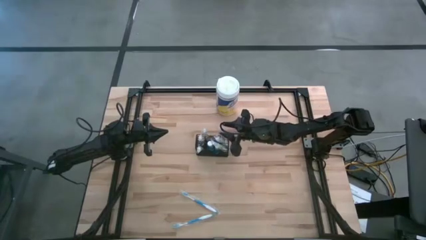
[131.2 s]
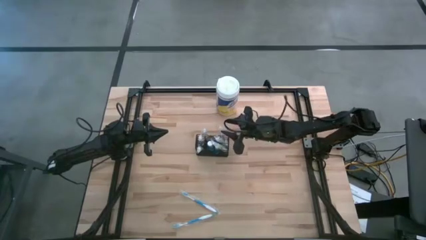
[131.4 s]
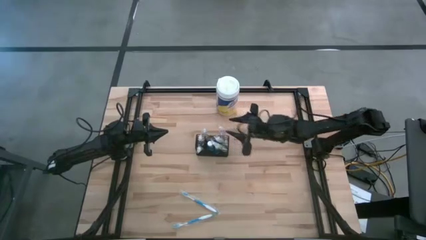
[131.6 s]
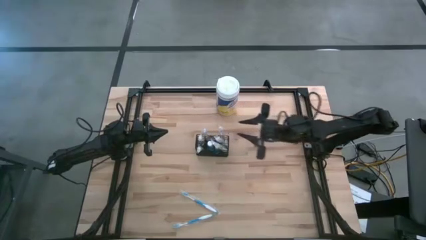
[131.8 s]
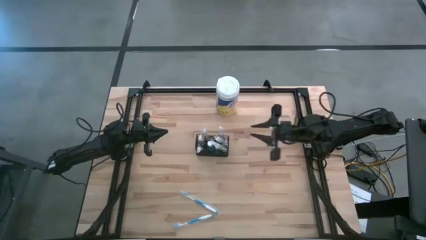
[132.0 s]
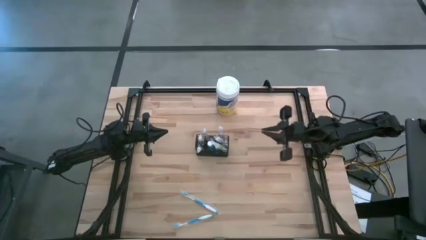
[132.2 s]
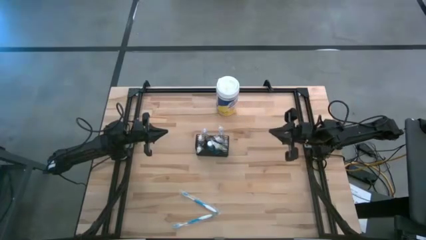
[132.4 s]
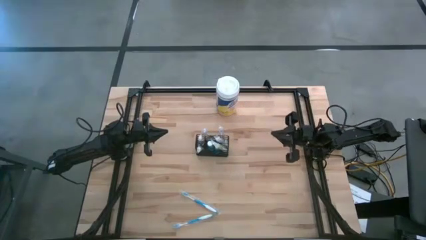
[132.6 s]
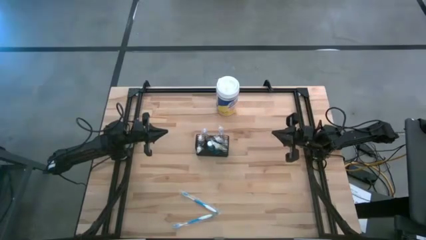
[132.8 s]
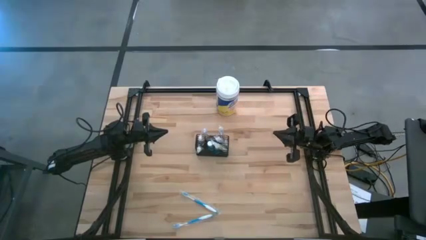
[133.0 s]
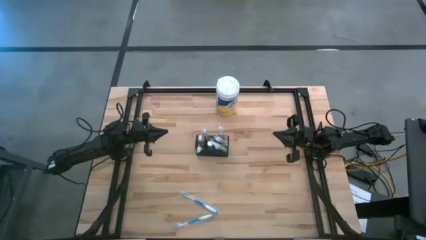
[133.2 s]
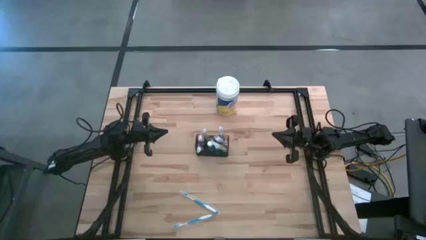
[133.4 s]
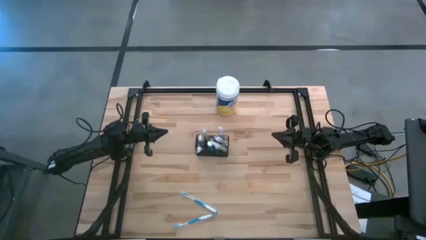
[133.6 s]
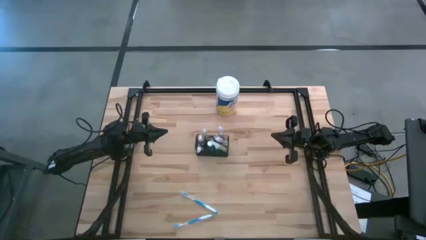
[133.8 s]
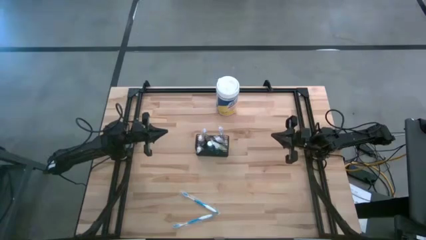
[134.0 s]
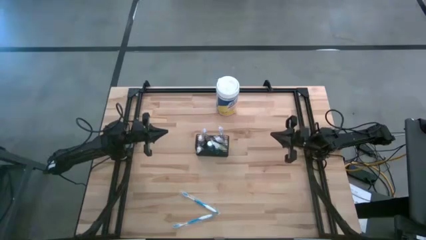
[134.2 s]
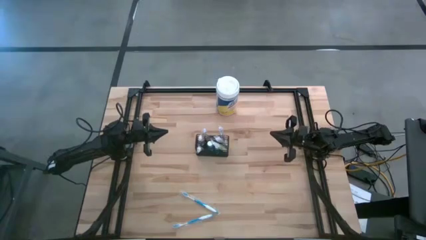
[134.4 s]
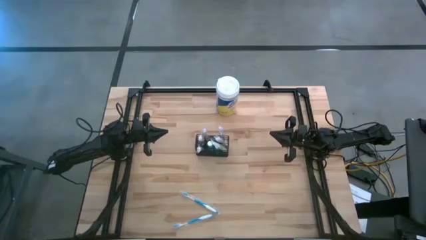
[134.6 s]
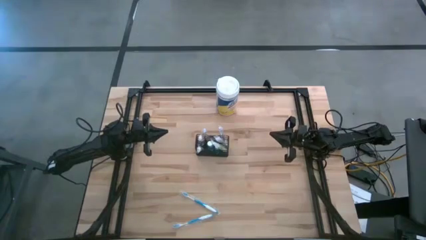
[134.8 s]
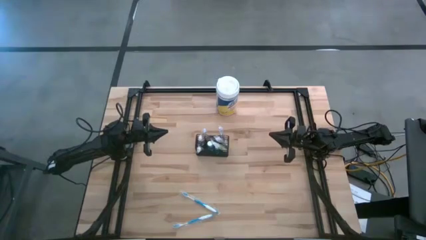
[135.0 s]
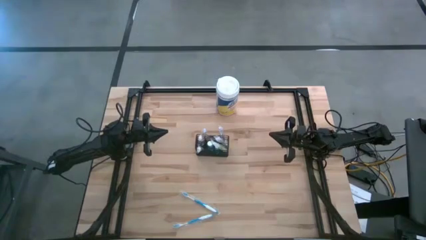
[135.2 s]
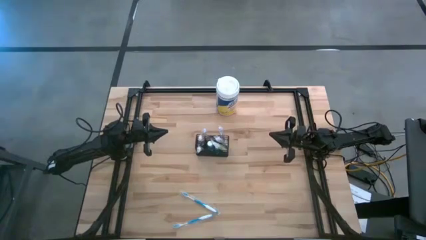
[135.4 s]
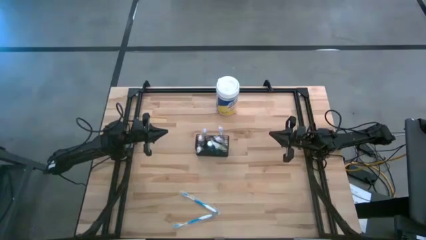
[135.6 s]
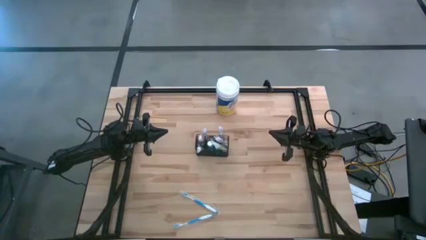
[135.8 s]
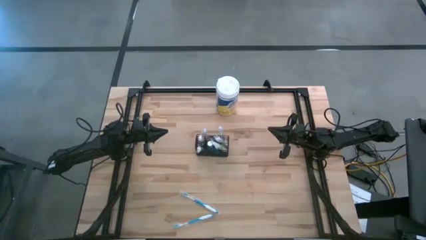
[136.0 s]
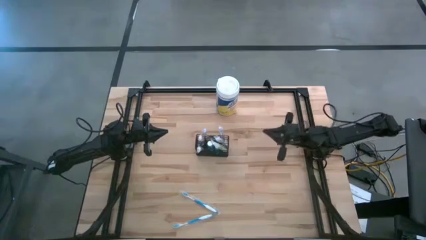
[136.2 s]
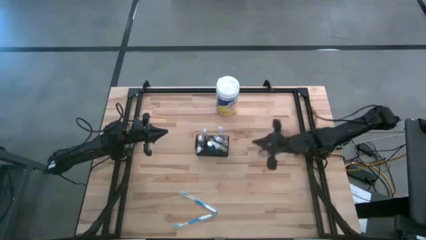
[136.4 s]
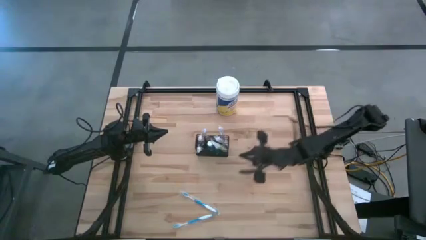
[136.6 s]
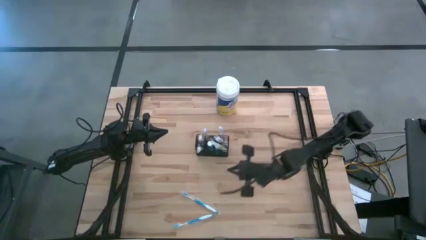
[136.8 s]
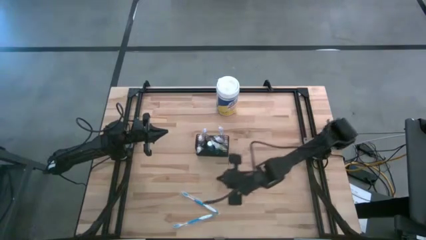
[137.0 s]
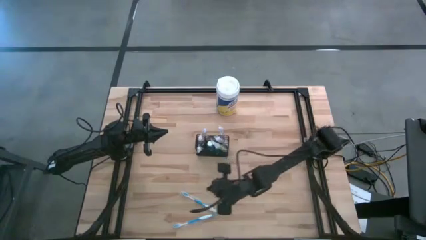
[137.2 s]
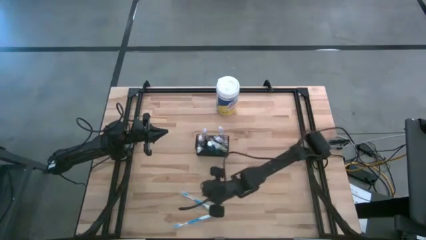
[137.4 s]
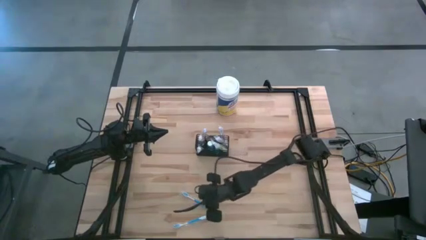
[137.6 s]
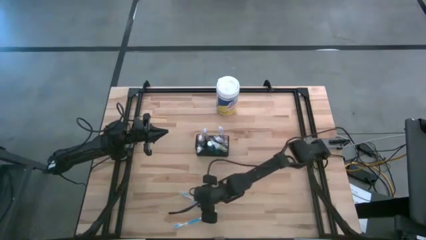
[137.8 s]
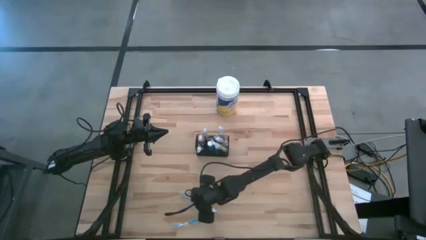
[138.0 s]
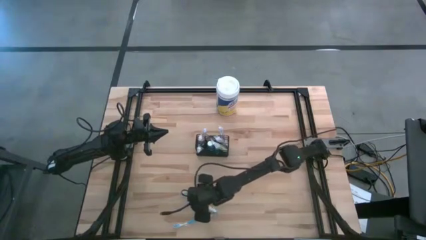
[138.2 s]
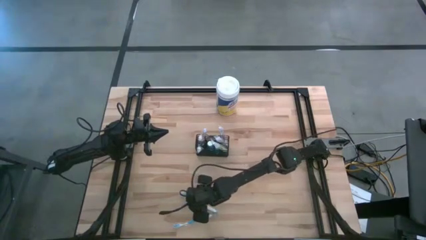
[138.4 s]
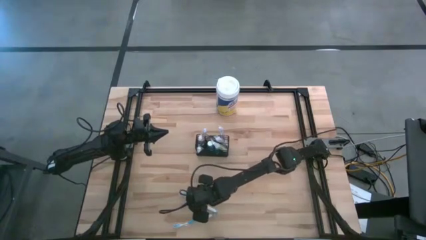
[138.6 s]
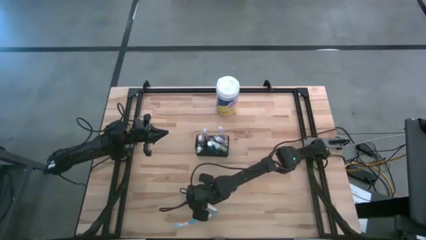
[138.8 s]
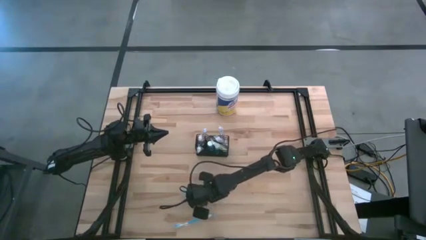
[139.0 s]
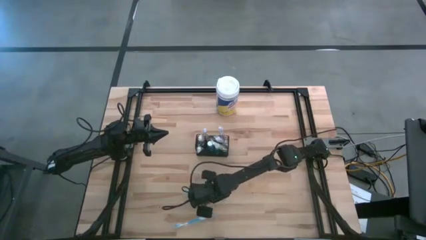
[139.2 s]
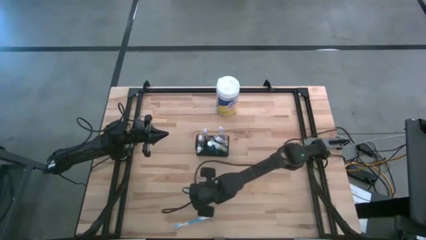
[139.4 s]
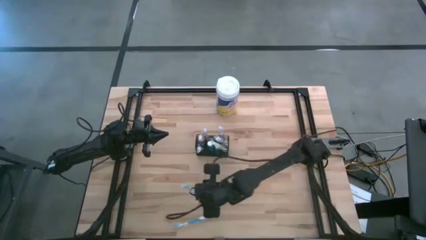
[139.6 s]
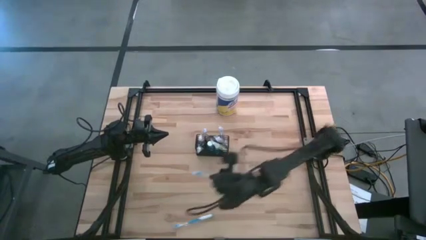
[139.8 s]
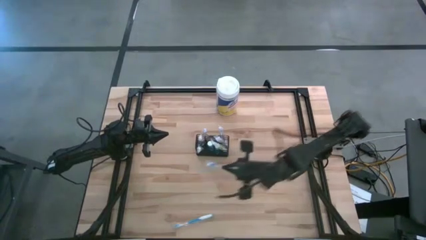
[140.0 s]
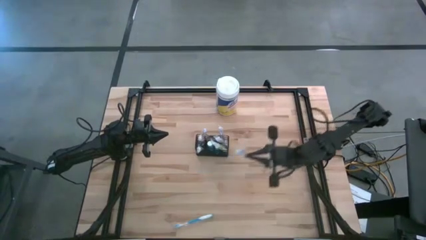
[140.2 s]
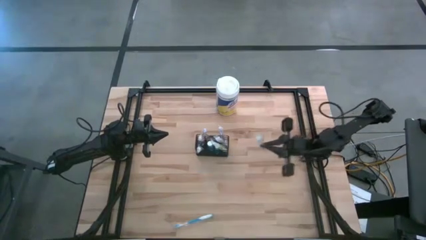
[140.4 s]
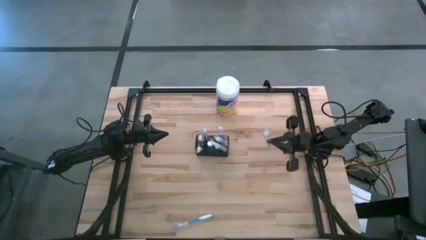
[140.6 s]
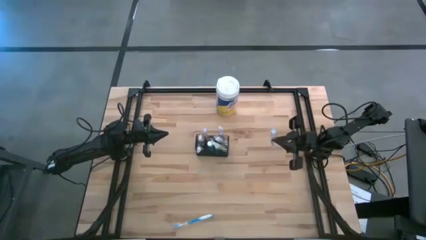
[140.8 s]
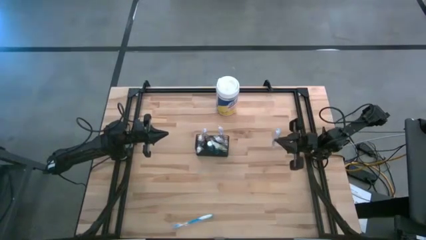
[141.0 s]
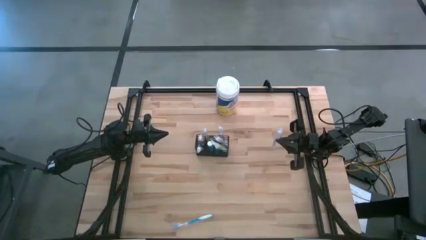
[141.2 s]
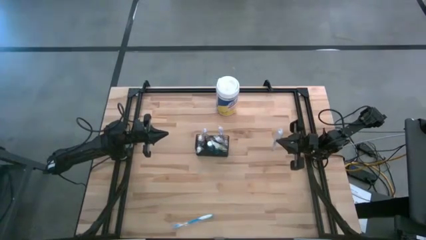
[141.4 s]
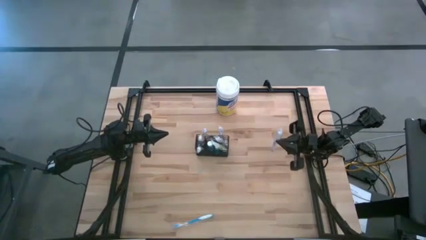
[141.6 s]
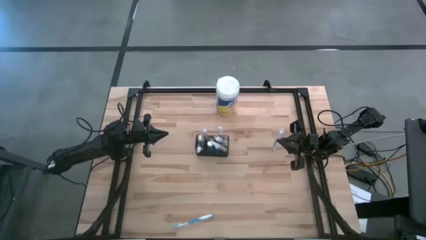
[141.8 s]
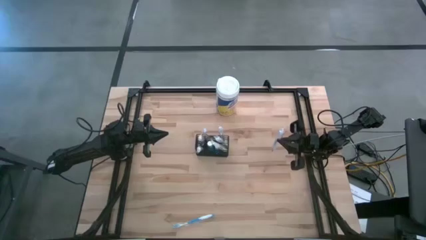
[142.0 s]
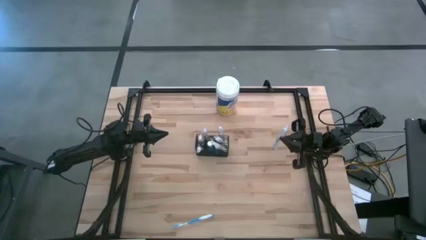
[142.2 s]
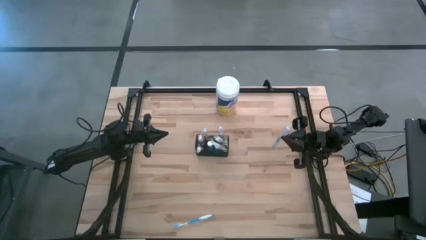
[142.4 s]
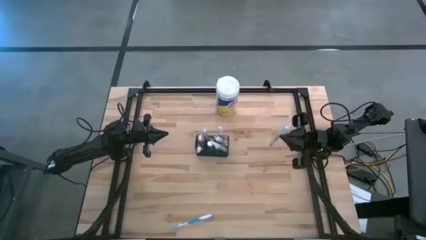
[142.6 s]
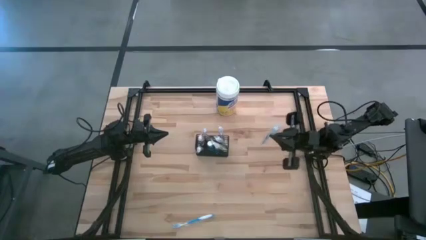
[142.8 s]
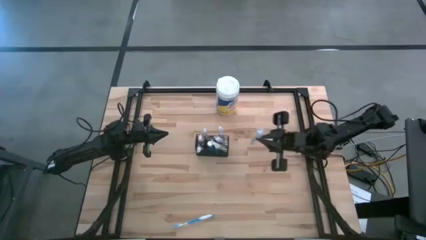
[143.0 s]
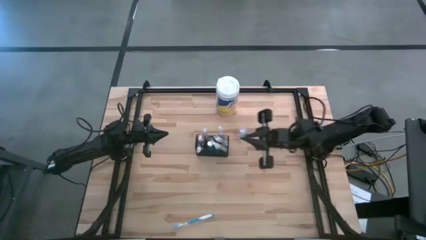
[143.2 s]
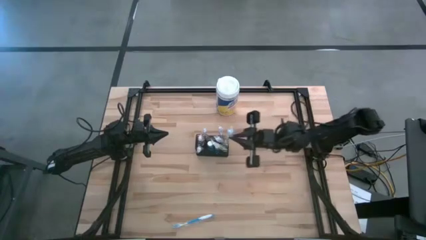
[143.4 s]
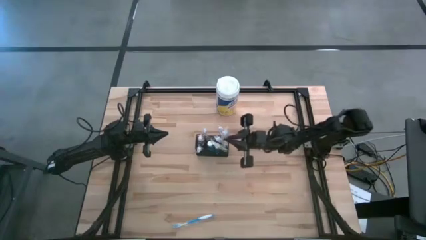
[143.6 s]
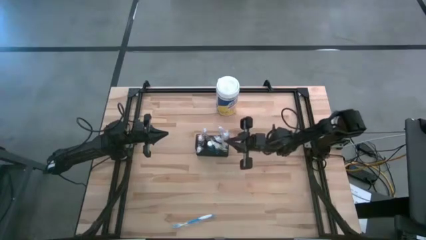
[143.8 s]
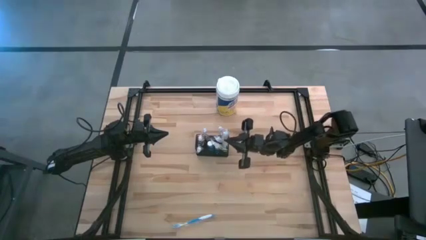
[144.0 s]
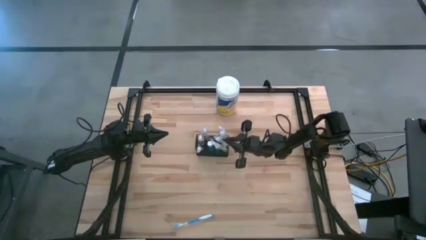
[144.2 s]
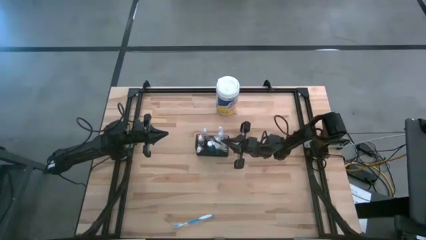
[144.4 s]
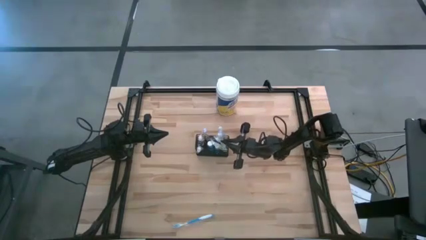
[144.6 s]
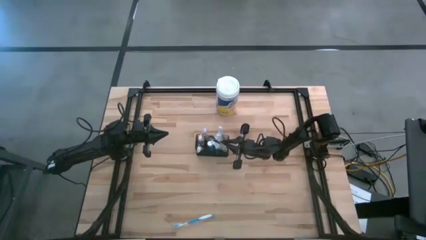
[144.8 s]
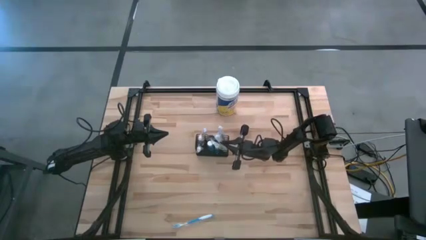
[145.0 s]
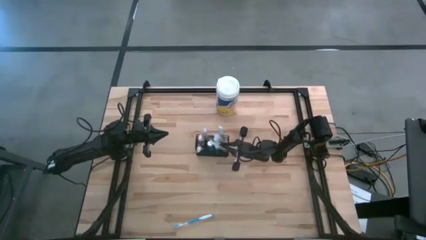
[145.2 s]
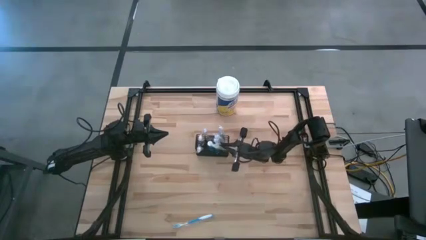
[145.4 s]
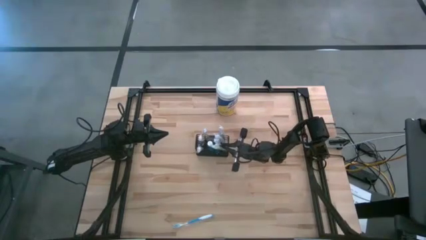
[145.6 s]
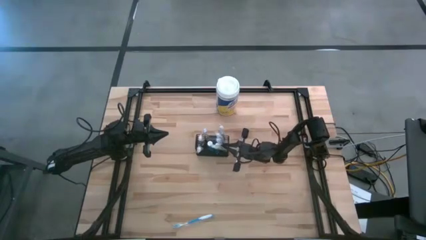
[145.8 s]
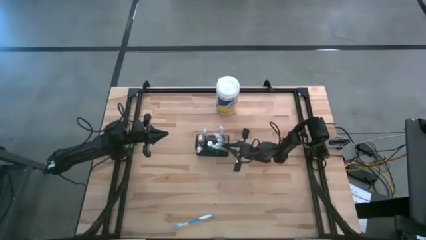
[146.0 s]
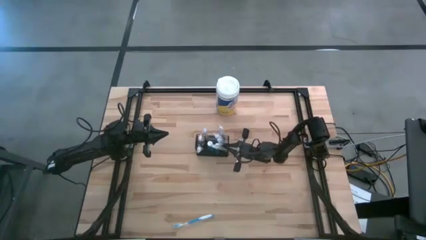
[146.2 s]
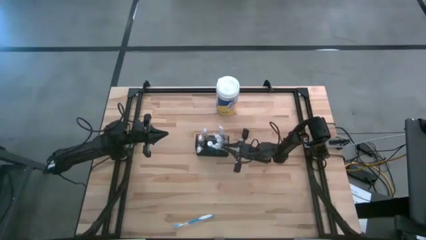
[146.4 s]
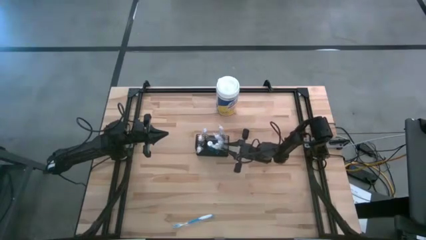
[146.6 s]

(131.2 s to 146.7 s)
Task: Pick & Place toothbrushing station
Put the top blue toothbrush into the black wire organizer
